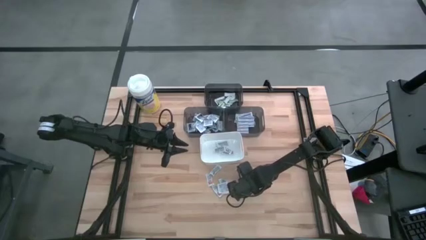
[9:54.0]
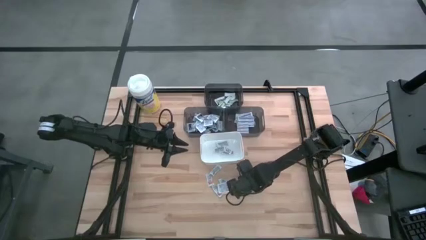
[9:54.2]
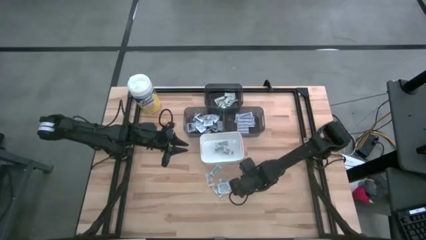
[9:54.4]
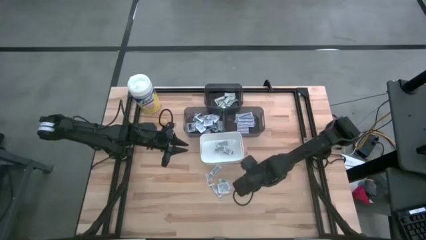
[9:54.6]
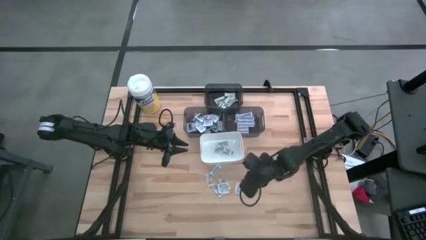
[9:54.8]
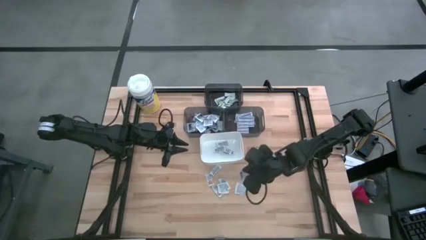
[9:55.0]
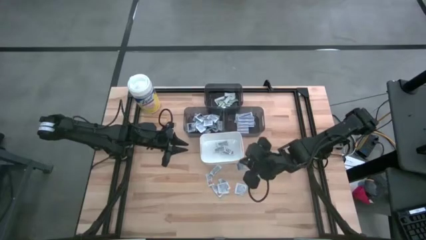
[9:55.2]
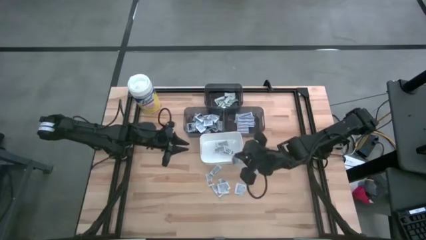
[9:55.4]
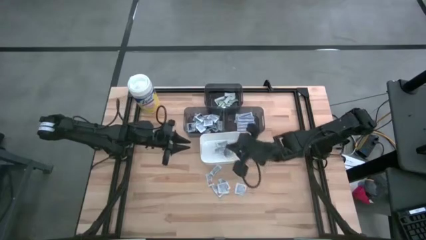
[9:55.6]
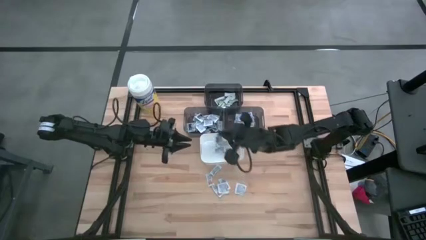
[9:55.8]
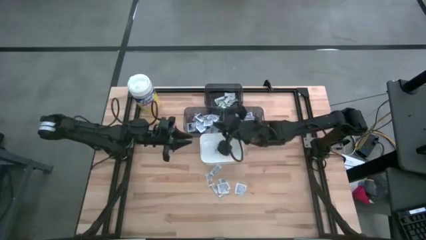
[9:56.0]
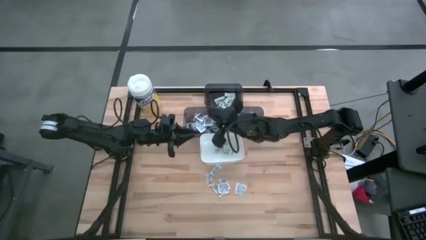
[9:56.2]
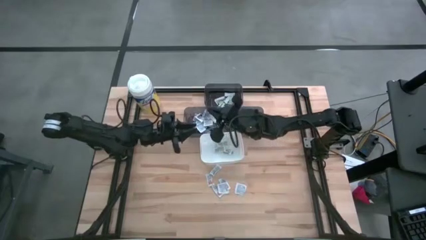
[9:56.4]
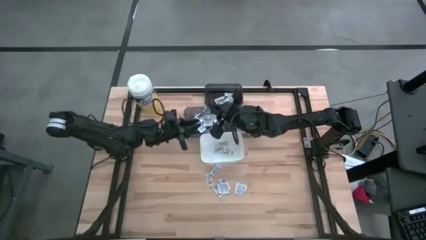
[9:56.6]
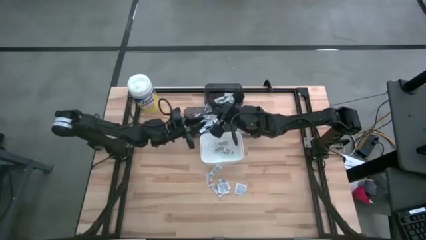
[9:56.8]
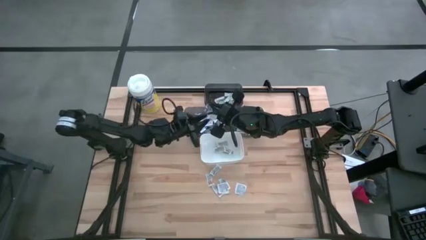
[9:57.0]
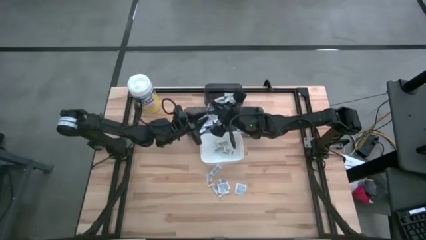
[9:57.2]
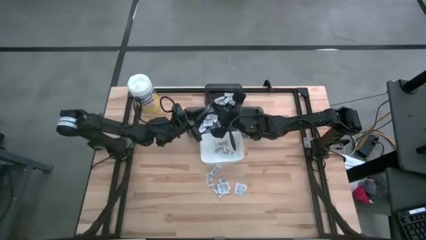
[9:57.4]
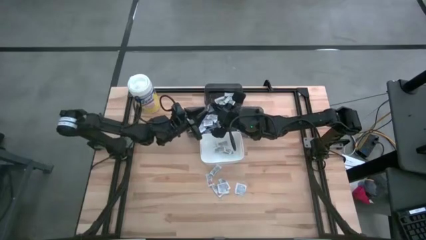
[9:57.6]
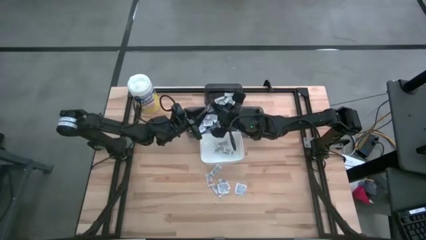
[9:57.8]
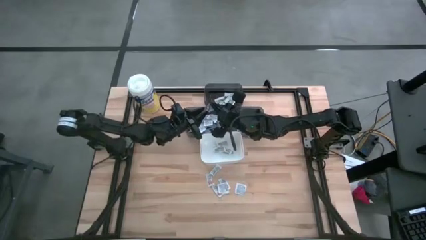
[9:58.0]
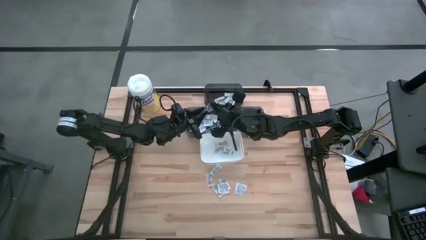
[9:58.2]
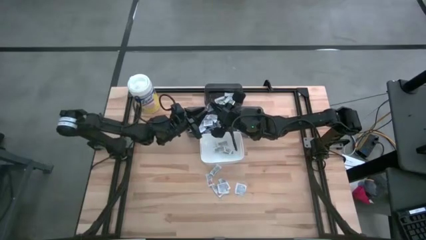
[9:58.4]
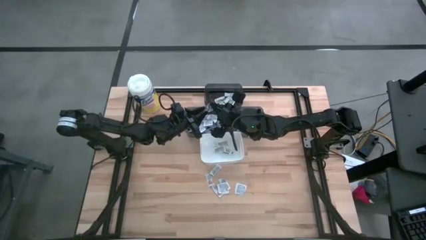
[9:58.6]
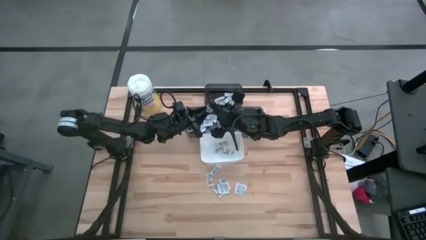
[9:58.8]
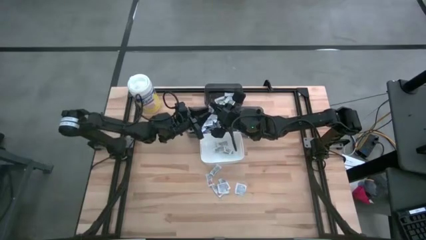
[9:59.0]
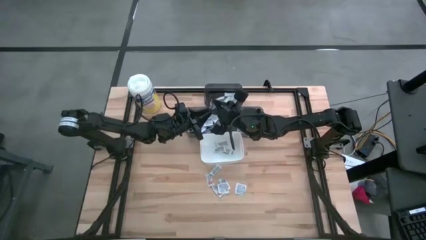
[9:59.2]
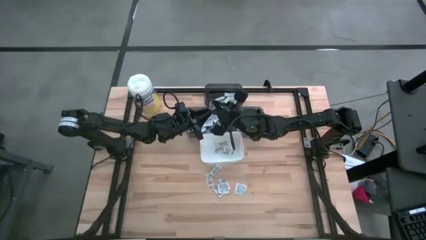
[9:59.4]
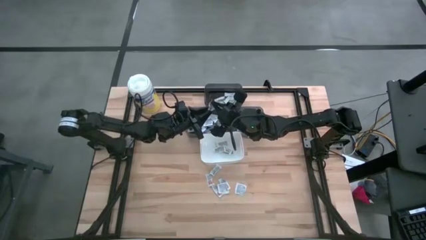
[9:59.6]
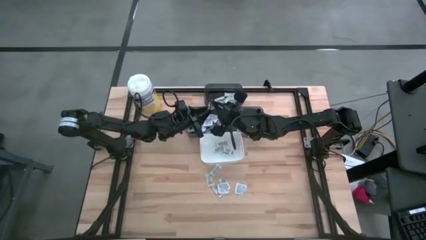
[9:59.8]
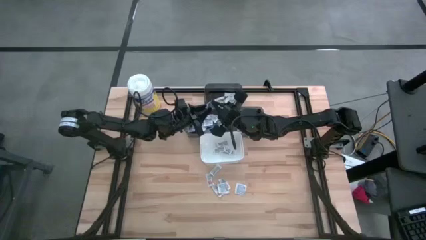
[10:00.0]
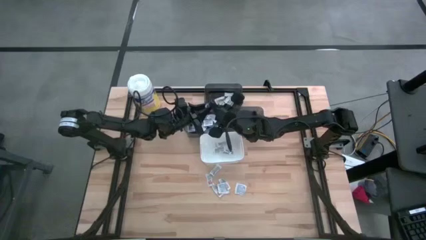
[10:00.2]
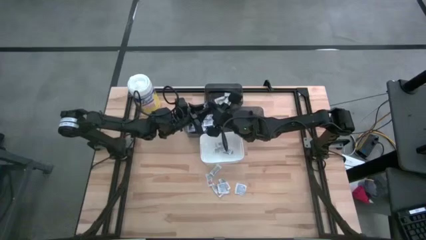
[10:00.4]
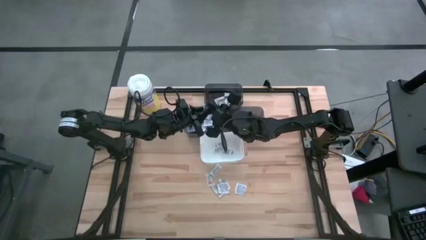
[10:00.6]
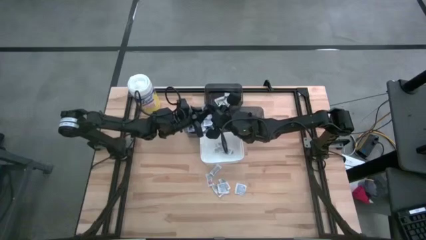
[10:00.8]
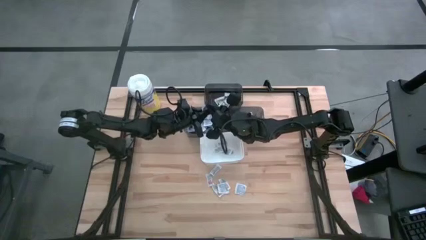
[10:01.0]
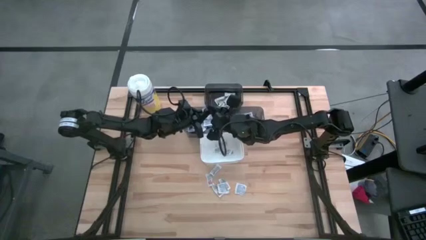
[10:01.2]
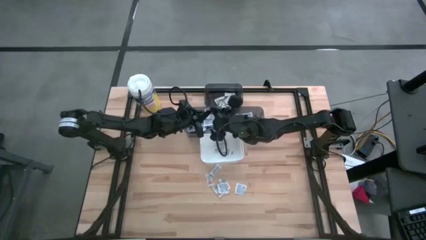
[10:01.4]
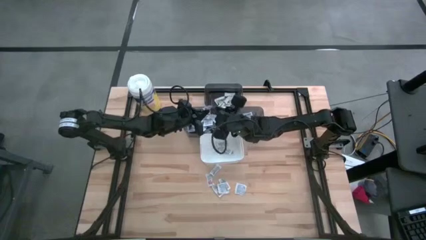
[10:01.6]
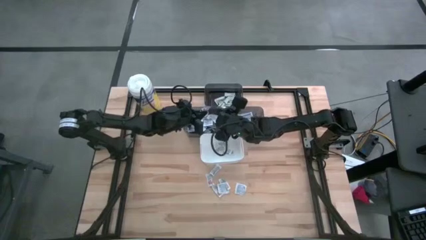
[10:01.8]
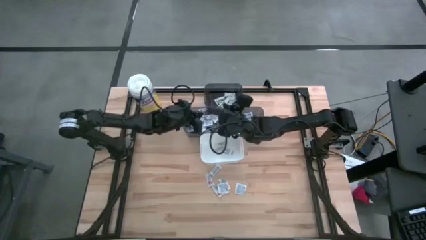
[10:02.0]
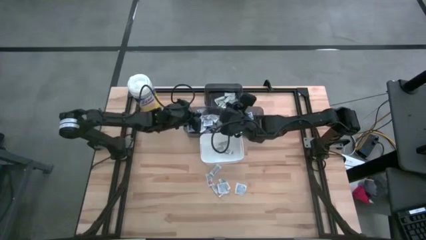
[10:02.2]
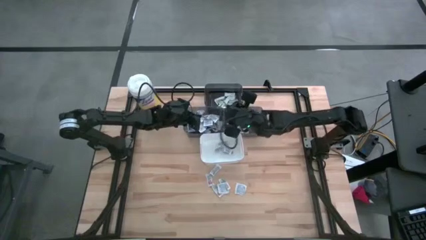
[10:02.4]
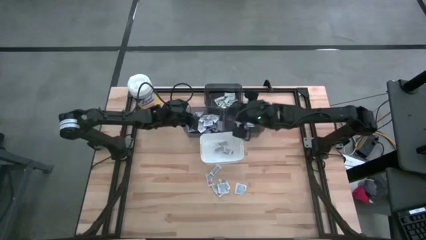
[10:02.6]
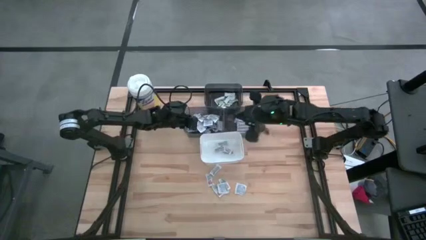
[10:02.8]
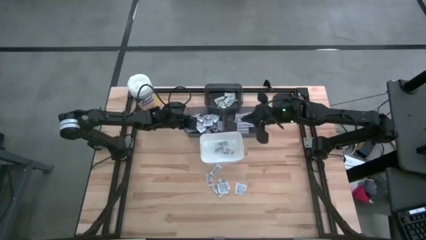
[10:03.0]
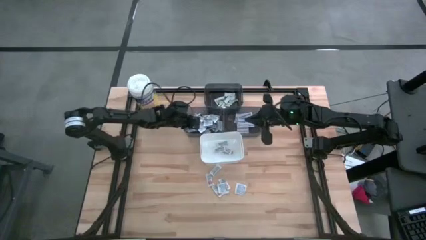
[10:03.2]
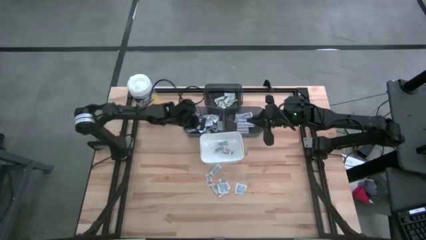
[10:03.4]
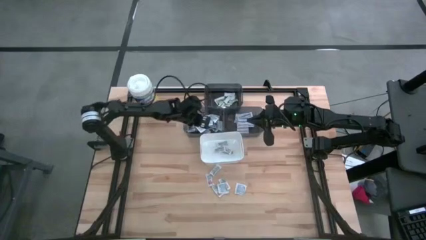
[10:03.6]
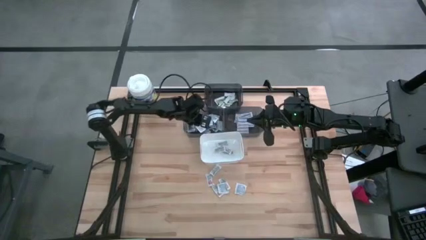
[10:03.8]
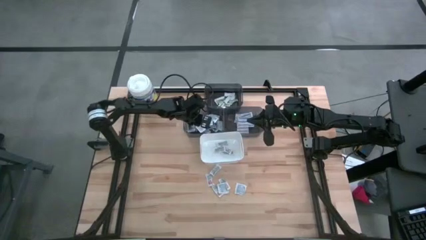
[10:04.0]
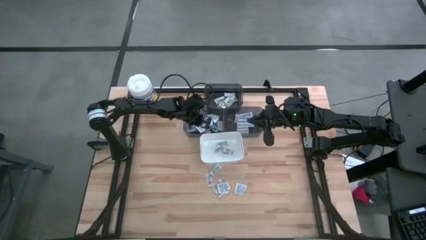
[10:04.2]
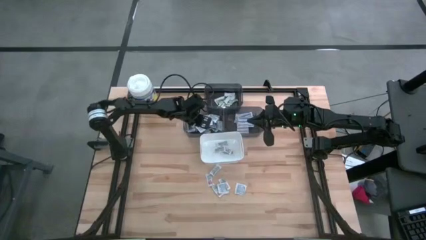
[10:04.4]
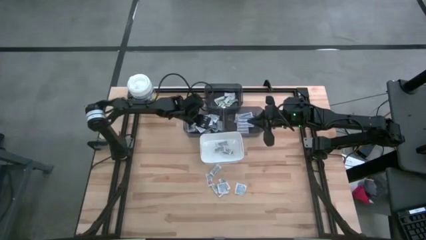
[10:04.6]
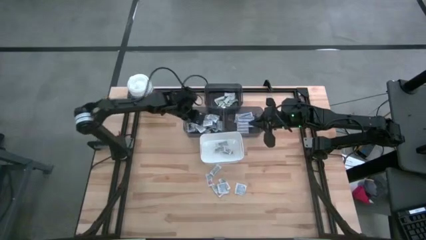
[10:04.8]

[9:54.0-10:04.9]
Task: Pick & Place First Aid Supplies
Put the alcohol pad into the left black bin

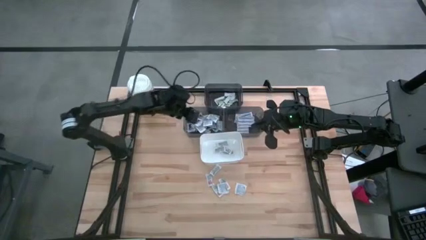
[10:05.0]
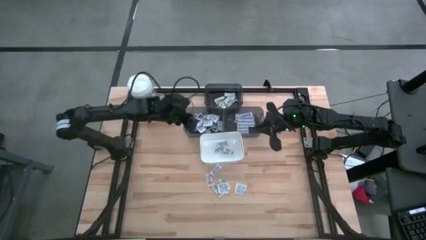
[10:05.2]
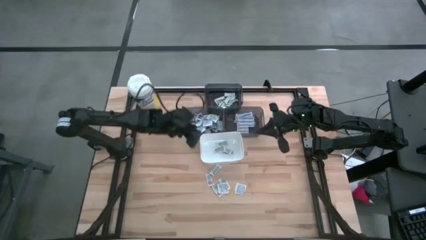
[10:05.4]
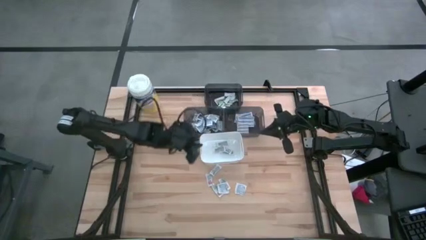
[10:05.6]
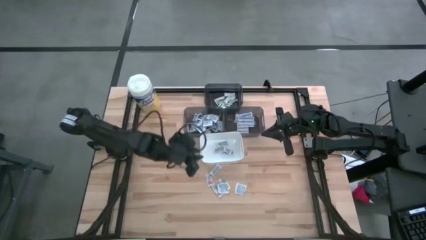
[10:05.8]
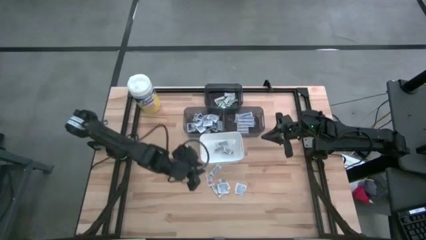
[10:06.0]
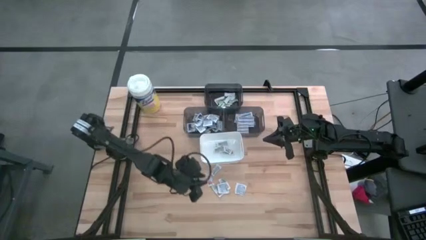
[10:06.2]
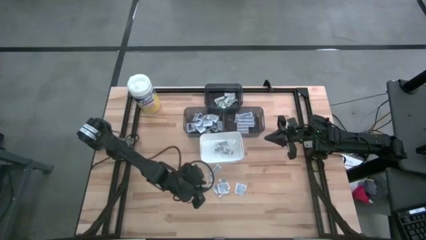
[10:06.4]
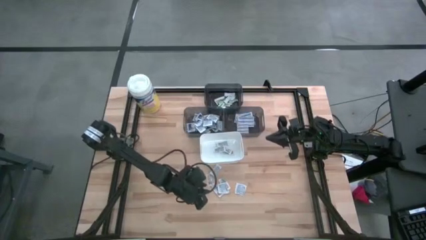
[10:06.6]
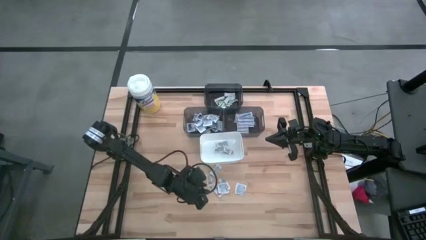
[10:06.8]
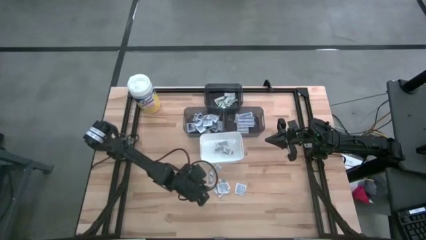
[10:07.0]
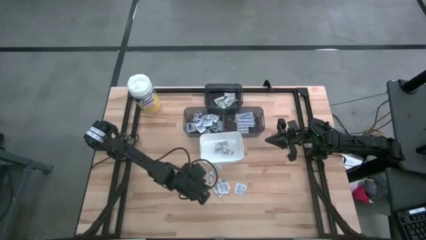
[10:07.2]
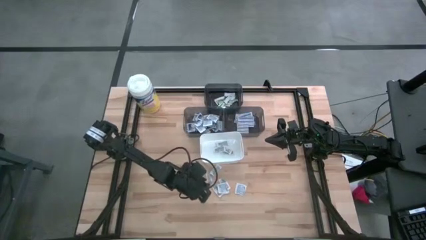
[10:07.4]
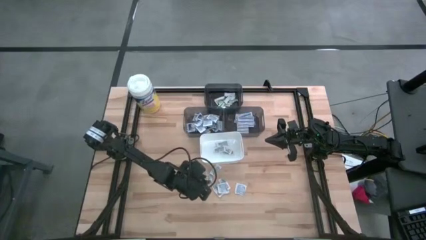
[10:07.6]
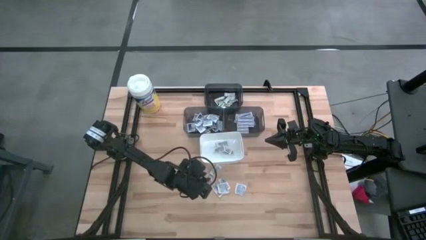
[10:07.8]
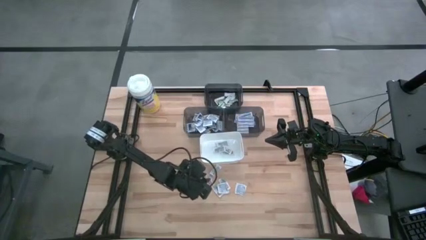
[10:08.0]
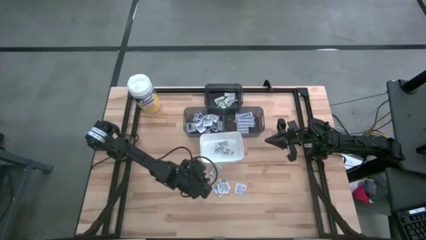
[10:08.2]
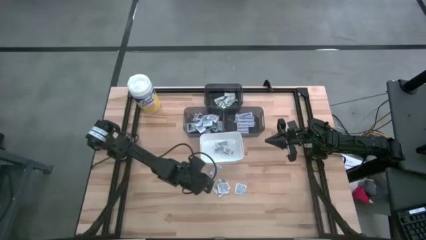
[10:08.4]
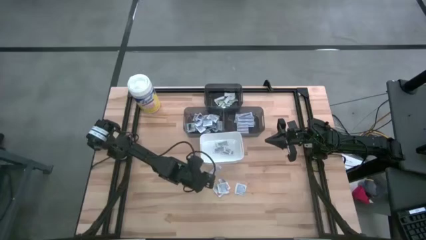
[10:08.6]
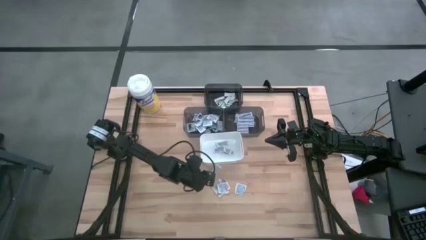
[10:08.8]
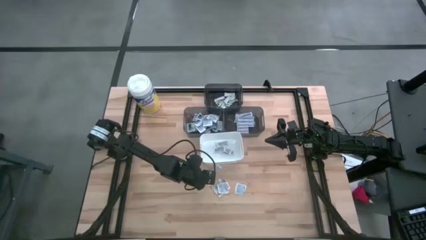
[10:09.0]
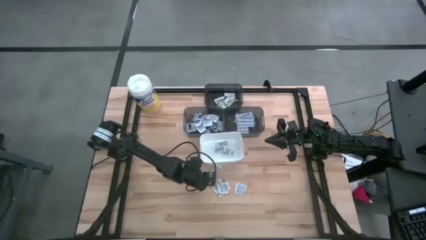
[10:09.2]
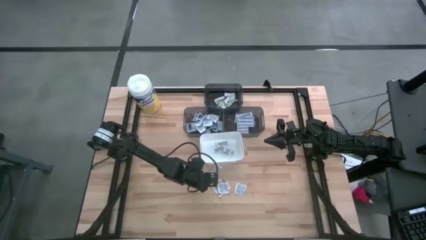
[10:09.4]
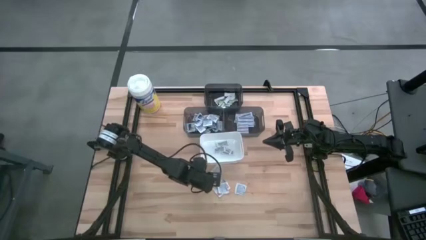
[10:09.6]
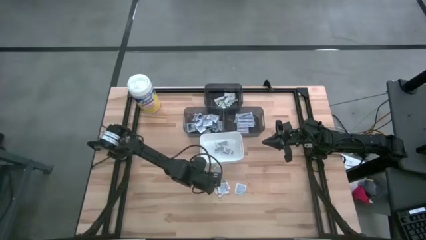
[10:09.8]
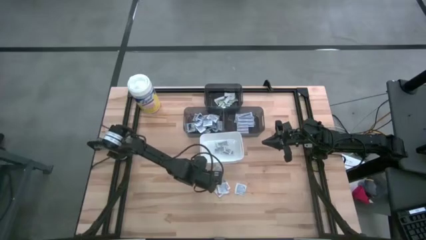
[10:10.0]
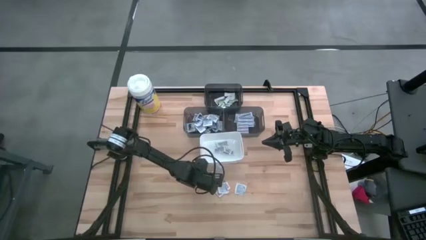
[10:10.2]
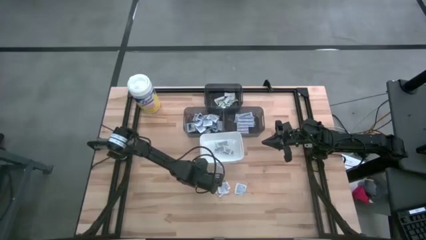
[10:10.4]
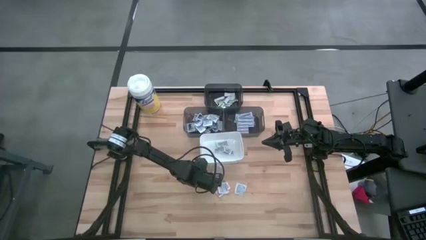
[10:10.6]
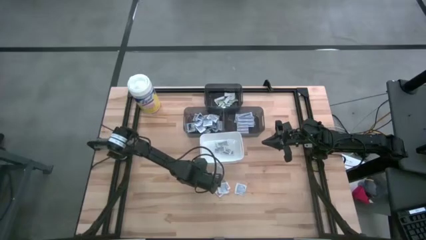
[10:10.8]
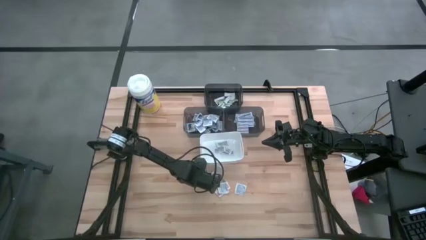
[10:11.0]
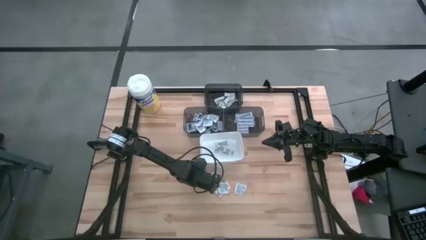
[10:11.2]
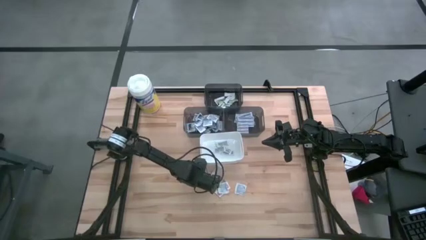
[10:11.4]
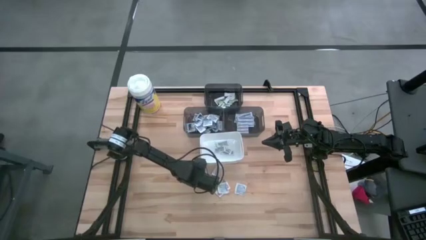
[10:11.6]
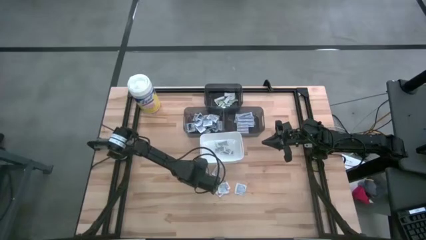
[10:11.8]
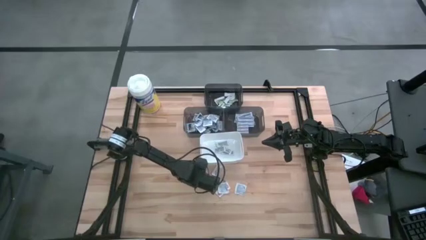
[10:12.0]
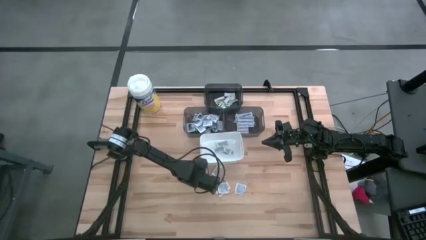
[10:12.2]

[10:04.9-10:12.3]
Put the ointment pack into the white bin
